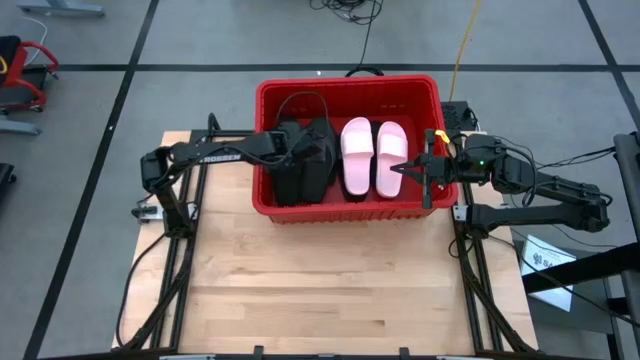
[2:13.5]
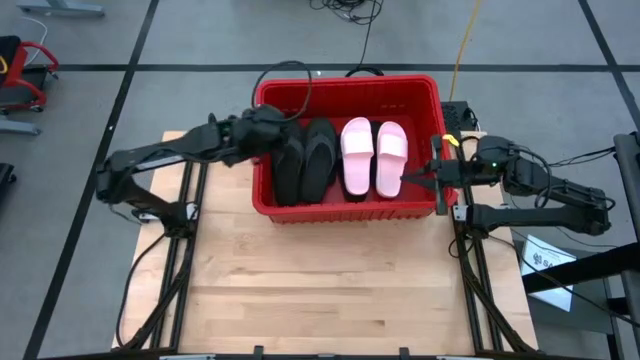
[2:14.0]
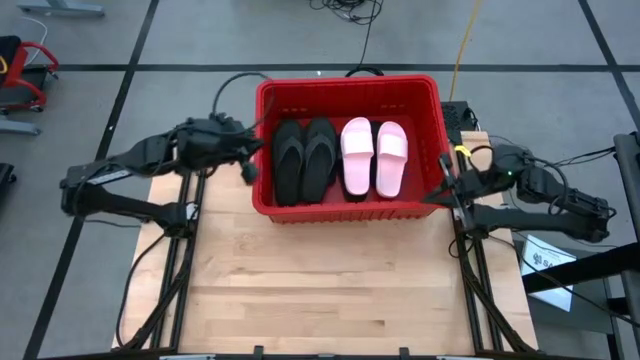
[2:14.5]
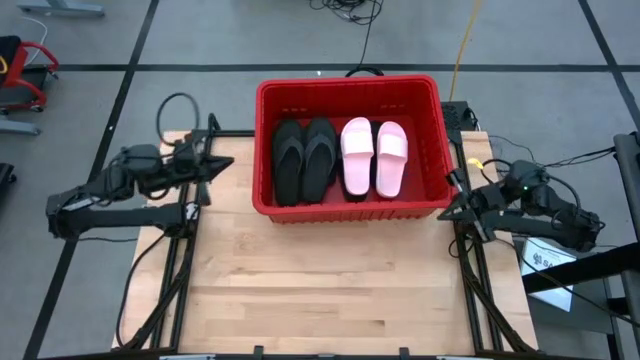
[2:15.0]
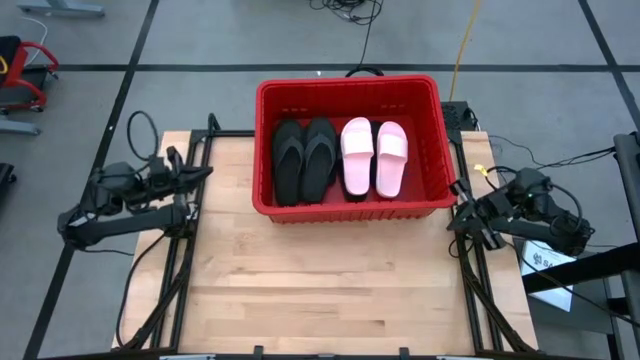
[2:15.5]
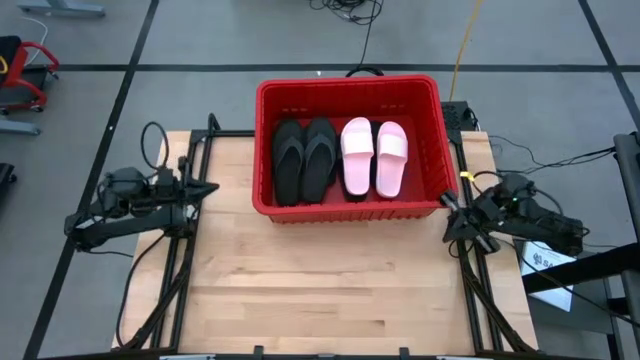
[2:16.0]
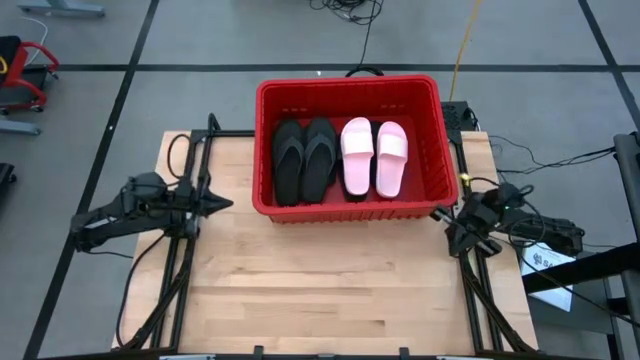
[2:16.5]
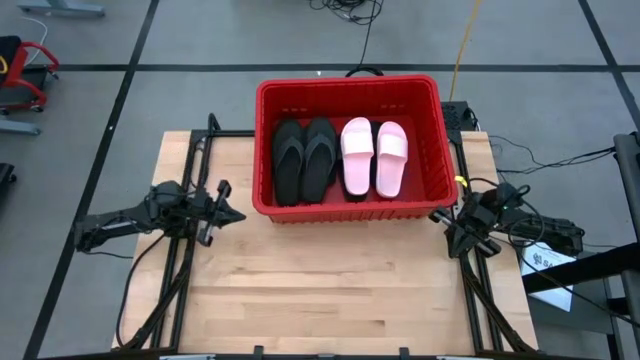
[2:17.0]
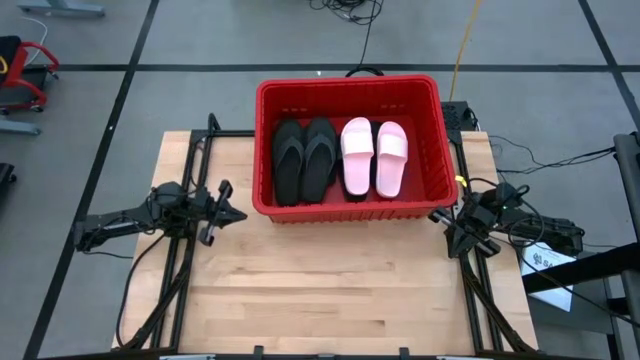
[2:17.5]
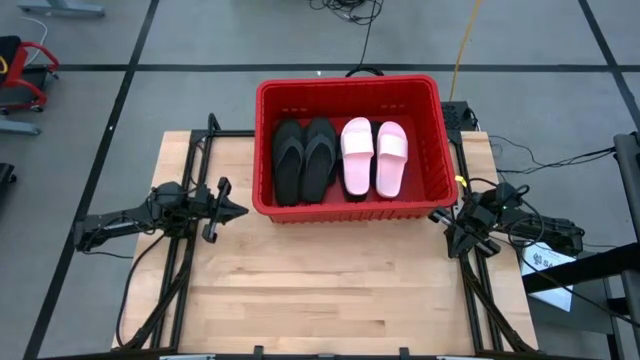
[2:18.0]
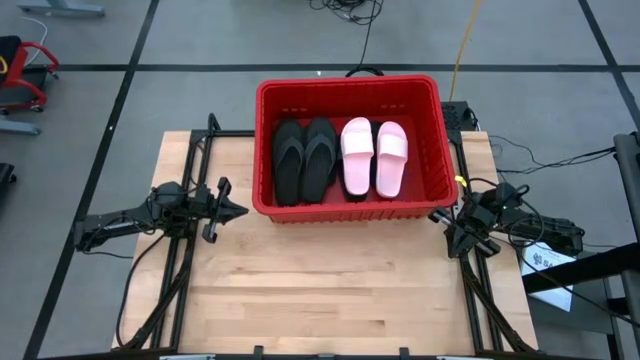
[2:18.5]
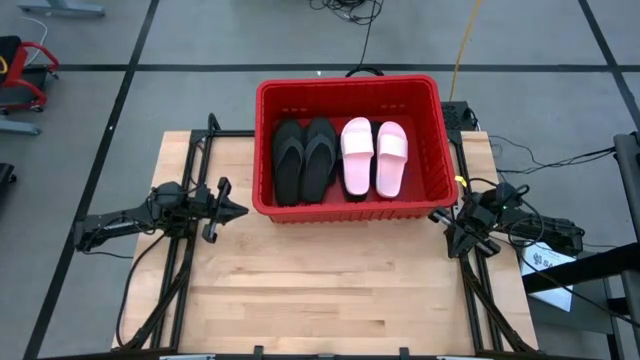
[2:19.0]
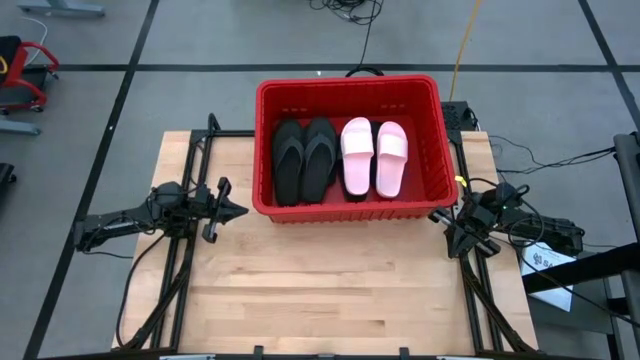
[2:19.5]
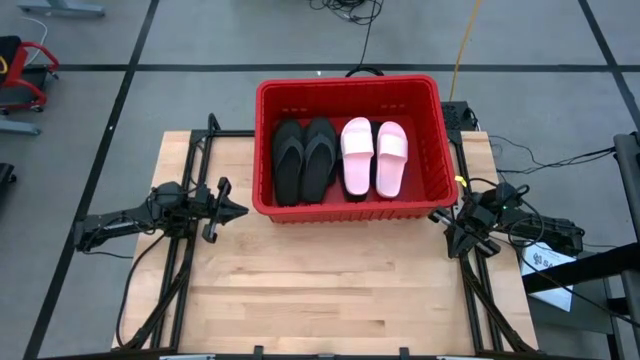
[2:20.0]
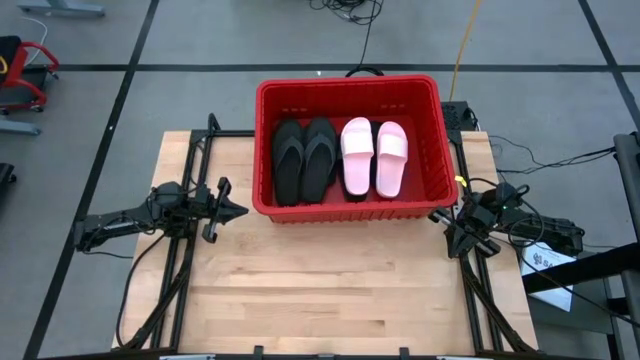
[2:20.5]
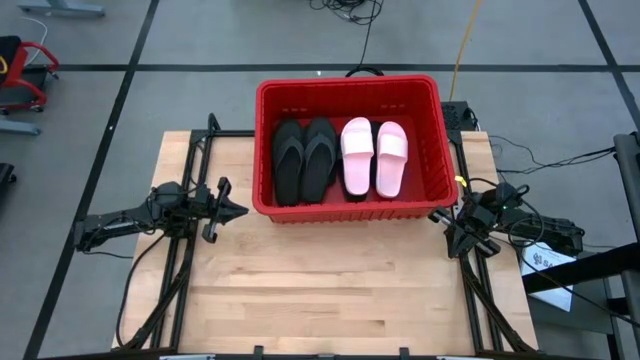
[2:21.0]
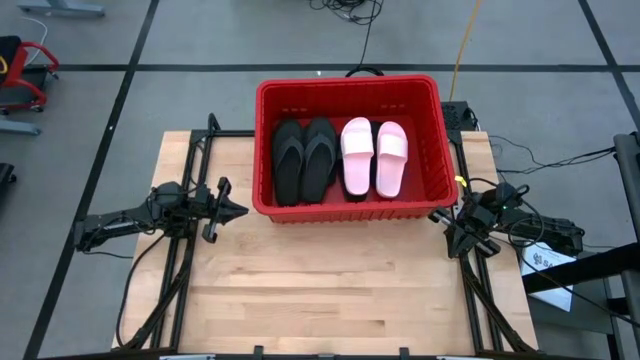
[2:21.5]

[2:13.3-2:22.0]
Task: Pick and place slides into bin
Return to Home Position
